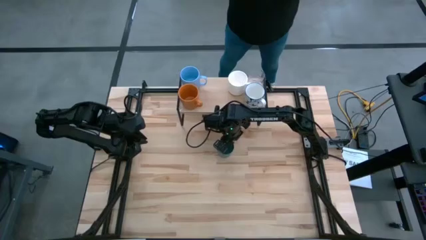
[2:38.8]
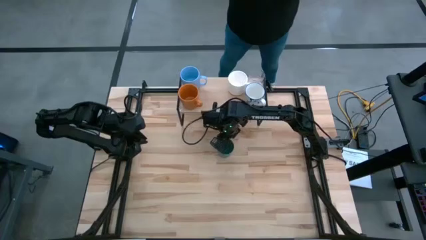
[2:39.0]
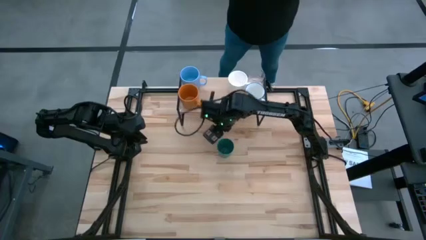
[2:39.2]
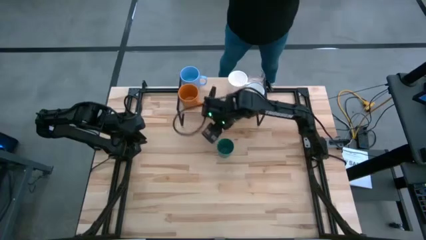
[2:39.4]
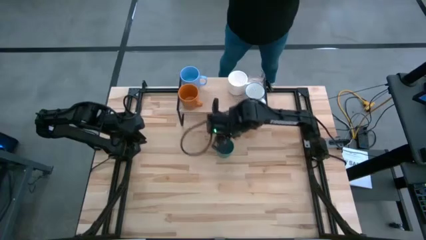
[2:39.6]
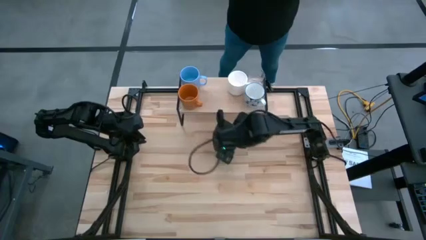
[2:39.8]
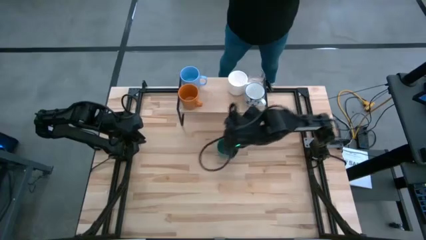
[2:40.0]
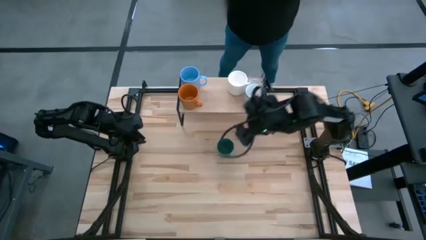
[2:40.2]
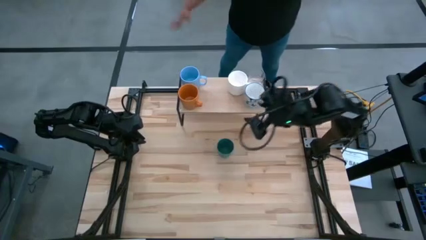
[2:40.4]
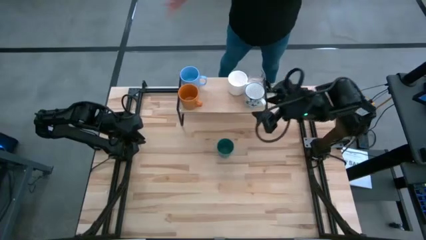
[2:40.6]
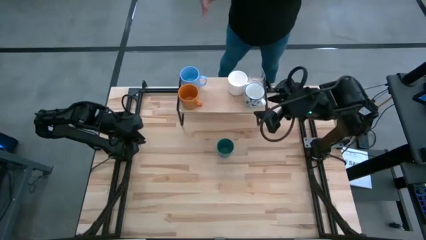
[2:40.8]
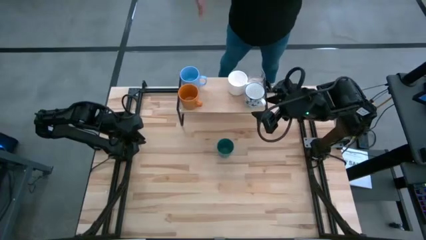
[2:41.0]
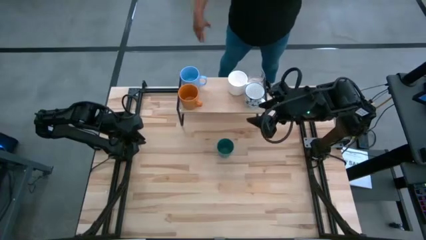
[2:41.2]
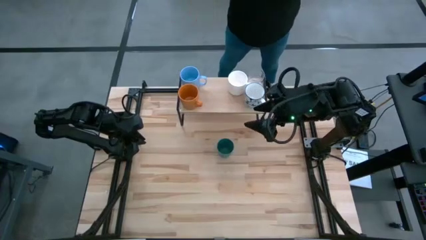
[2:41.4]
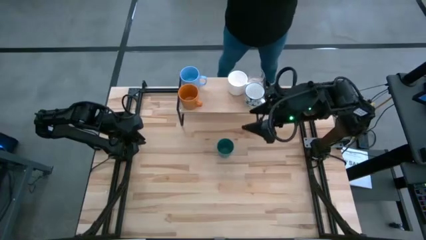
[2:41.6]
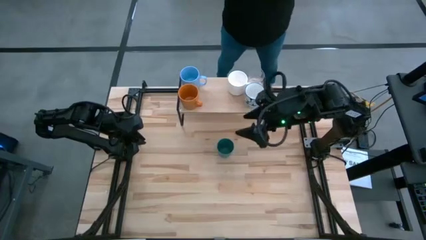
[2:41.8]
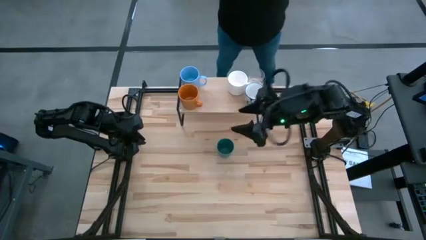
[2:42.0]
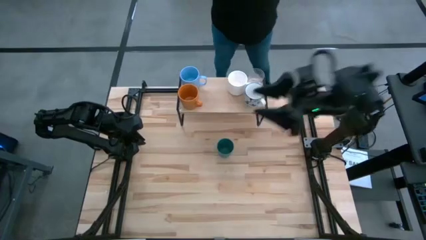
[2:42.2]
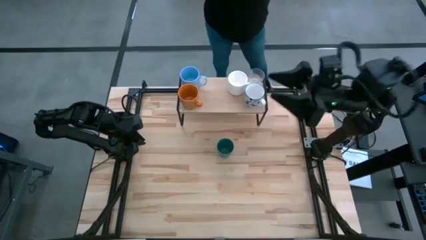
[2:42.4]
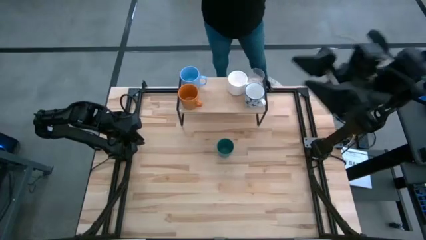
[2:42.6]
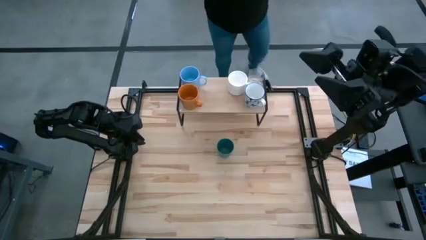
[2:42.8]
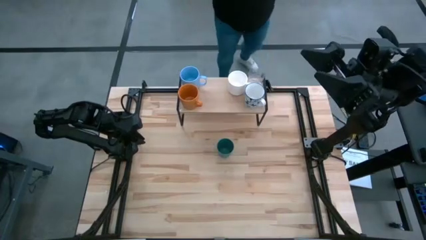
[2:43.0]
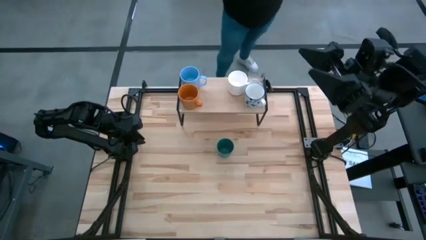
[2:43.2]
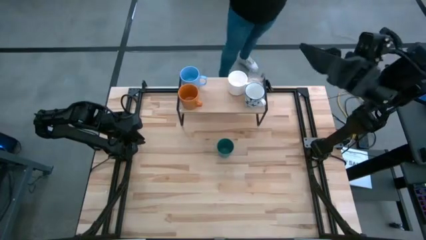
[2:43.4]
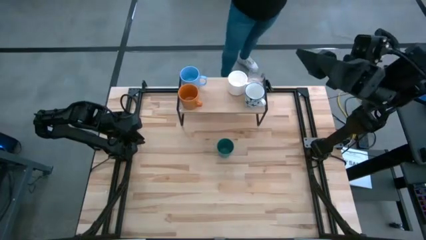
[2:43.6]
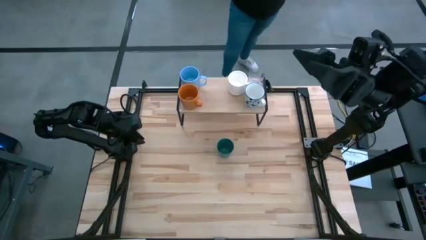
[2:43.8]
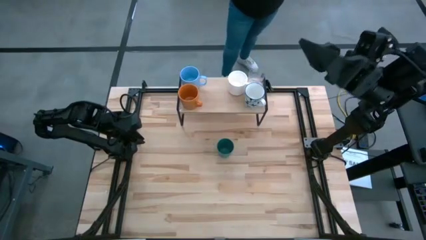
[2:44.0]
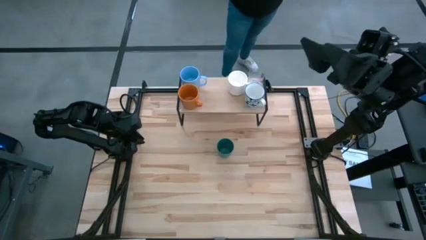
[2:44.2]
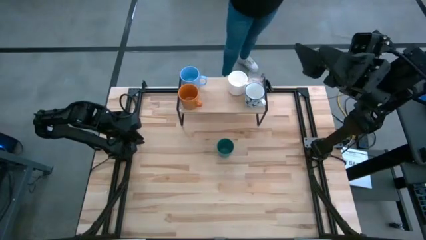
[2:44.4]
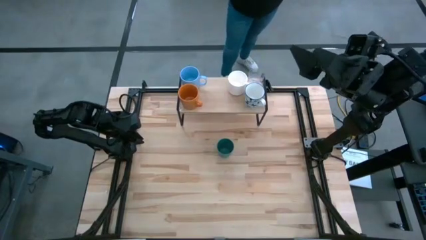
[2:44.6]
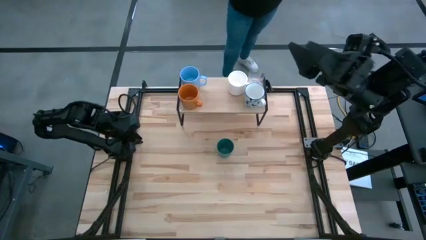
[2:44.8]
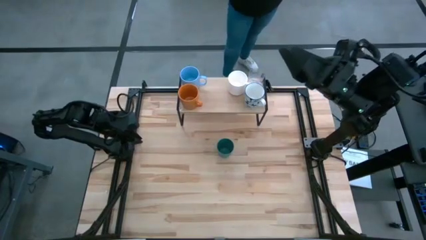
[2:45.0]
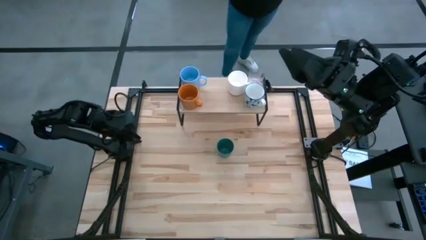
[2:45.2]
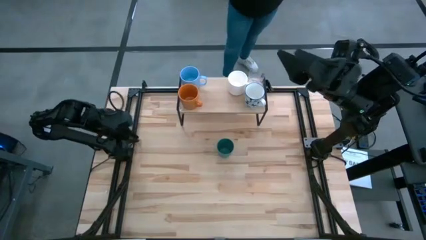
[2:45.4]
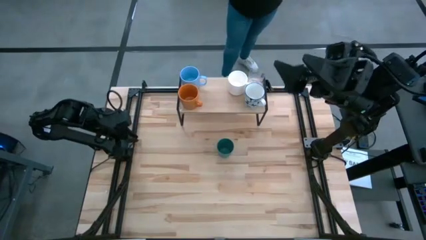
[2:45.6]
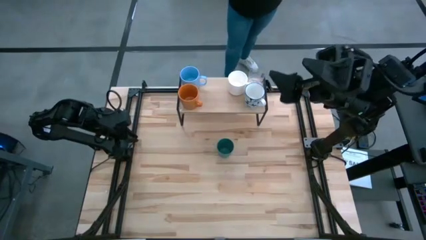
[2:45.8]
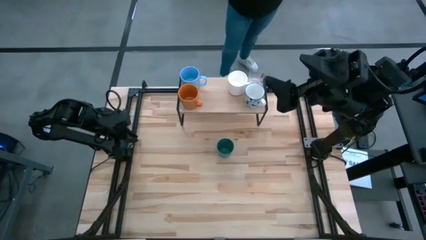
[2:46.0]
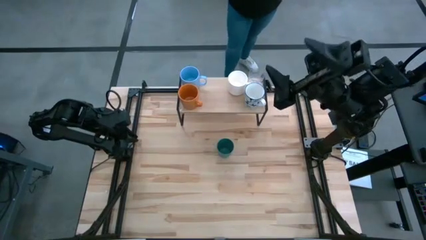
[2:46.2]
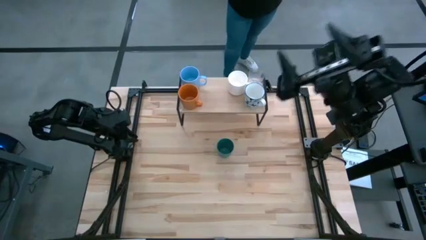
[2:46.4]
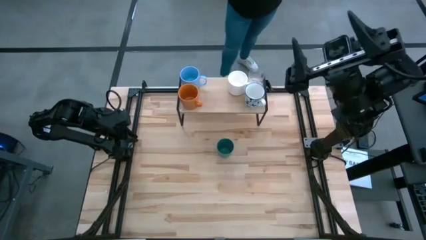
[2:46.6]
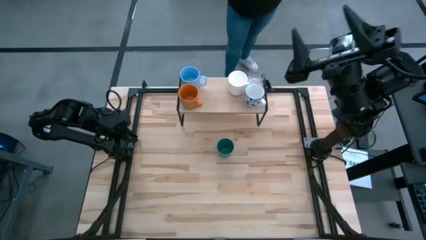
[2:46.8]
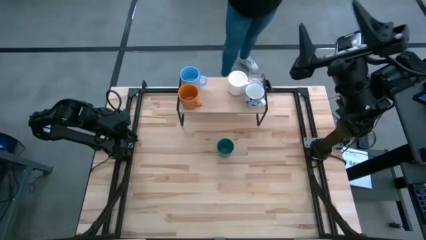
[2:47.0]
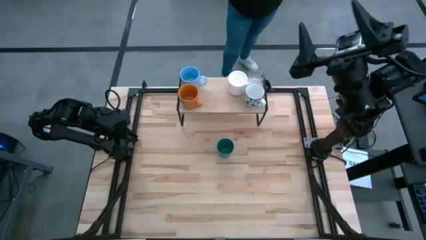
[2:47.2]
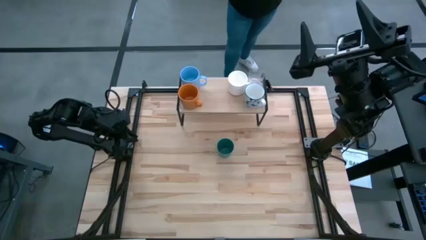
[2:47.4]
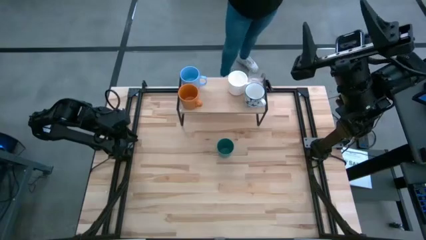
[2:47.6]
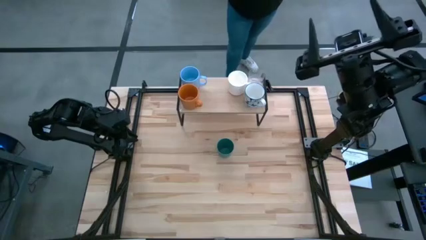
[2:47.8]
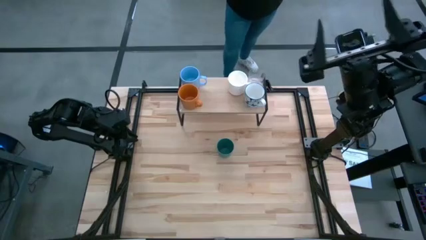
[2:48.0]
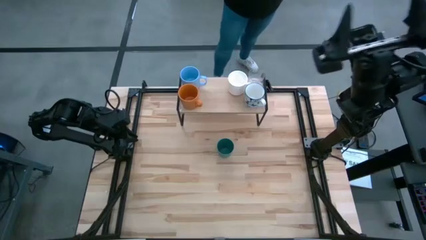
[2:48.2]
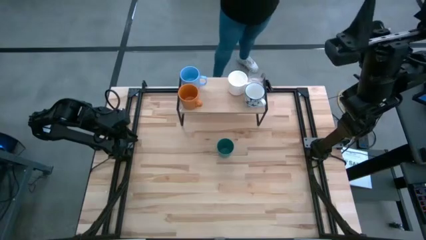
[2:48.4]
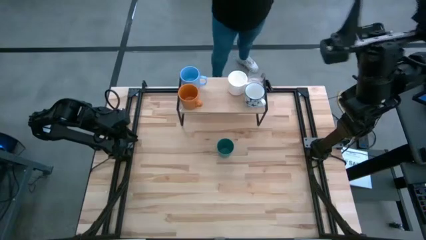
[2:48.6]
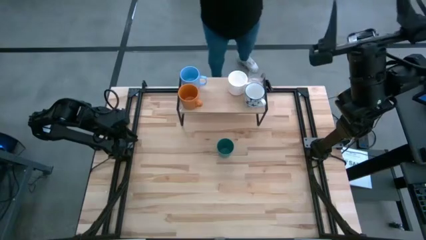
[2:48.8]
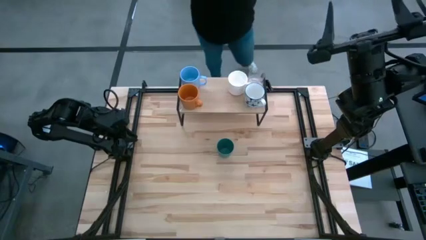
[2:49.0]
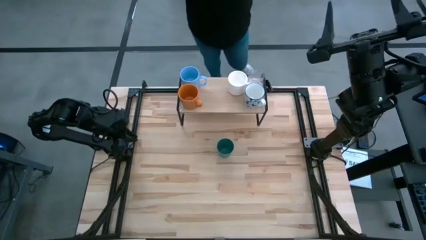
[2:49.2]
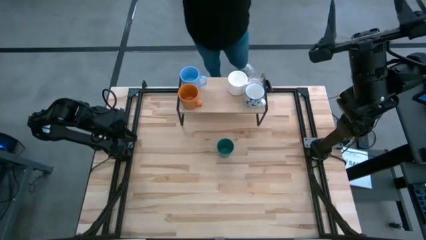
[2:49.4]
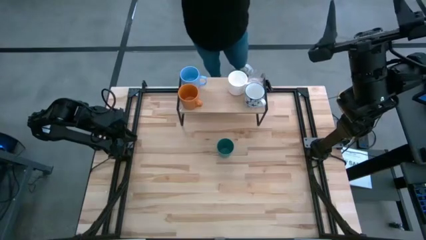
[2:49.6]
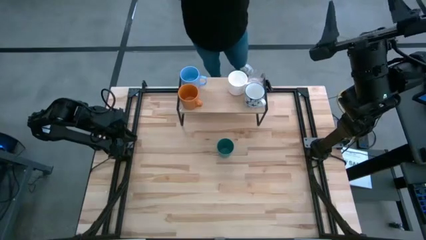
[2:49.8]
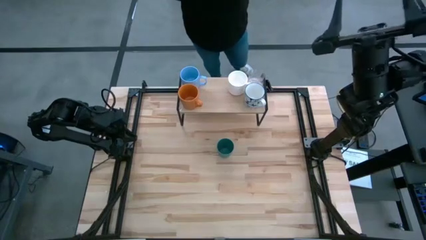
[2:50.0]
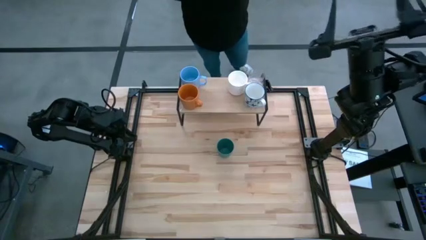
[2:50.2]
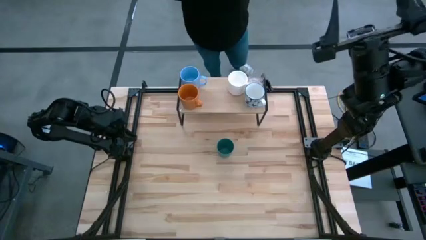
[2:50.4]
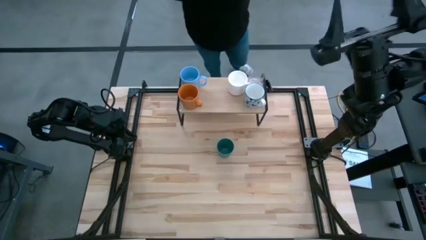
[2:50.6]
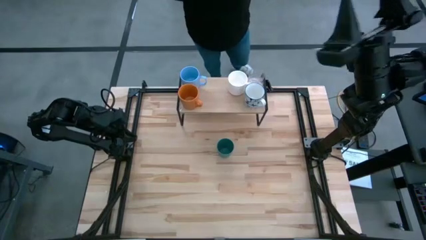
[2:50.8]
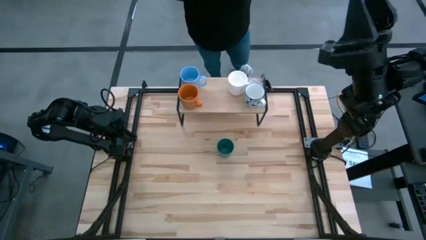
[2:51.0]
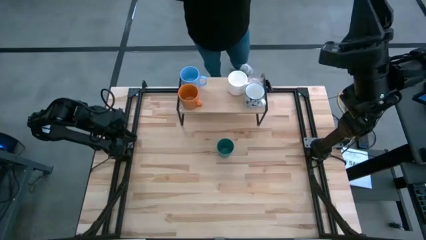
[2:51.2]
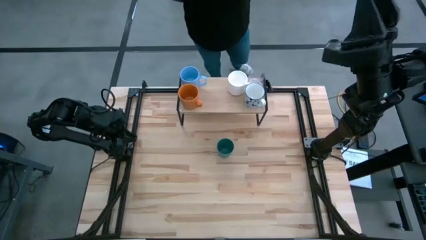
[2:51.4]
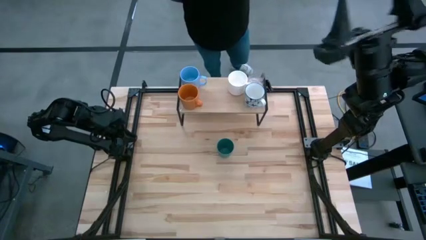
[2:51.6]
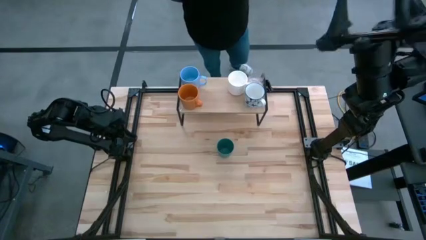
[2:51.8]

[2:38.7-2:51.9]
Task: Stack small to large cups/mugs on shelf
Put the green cup on the shelf

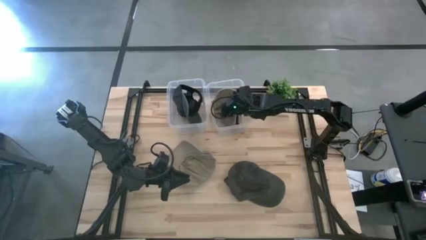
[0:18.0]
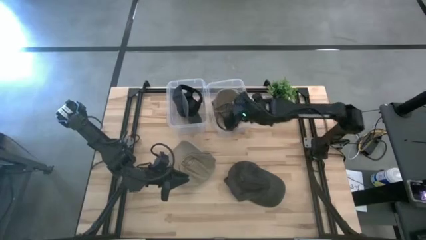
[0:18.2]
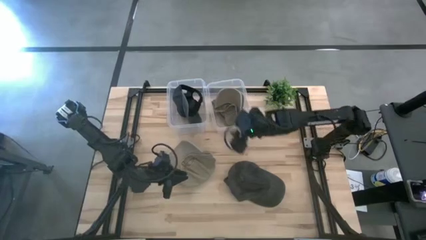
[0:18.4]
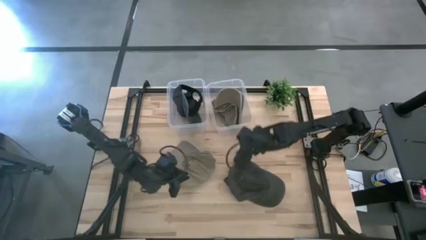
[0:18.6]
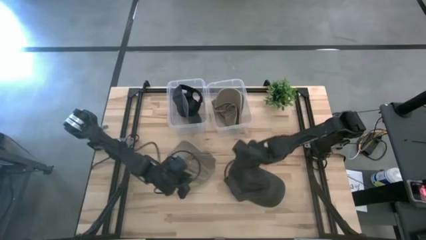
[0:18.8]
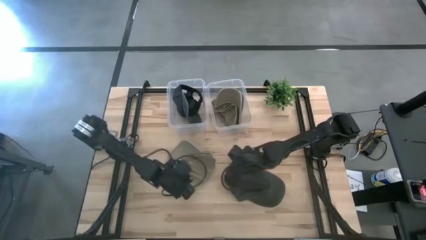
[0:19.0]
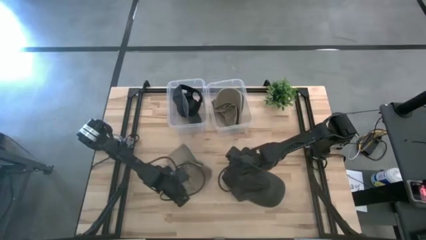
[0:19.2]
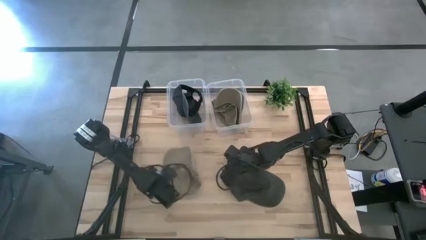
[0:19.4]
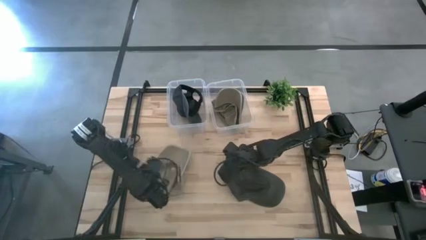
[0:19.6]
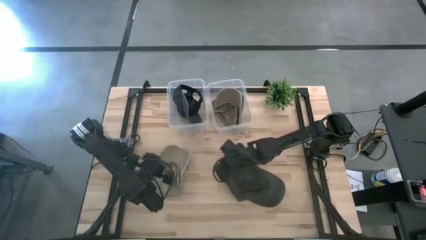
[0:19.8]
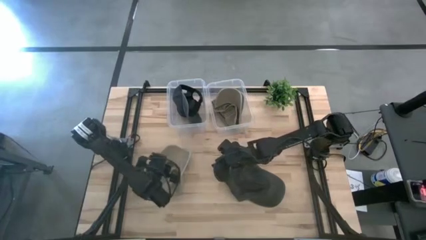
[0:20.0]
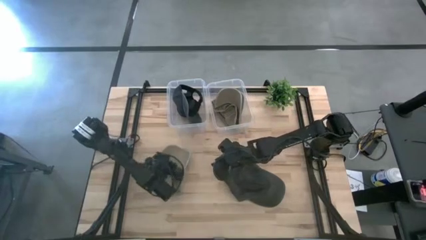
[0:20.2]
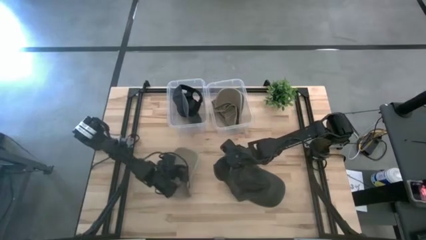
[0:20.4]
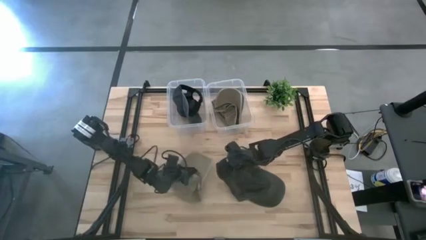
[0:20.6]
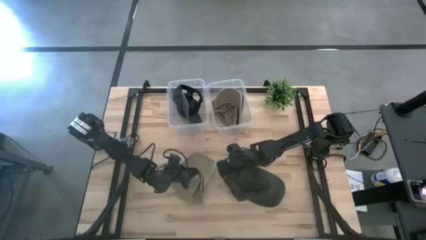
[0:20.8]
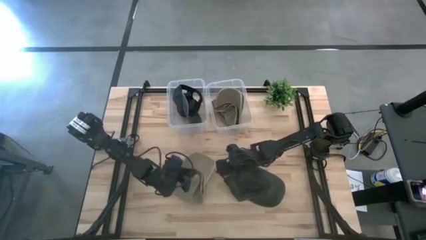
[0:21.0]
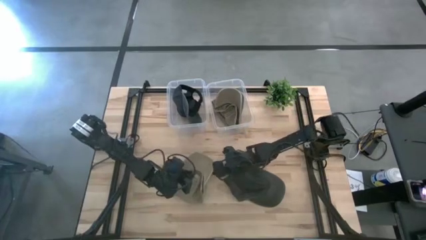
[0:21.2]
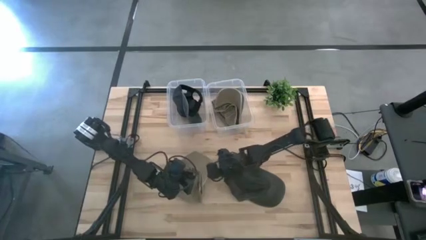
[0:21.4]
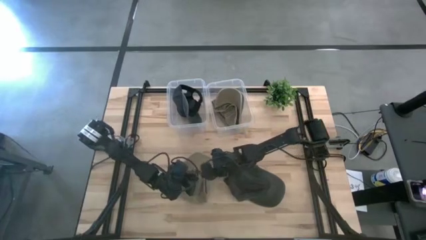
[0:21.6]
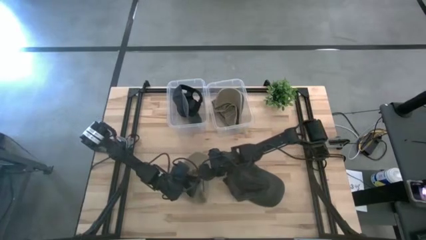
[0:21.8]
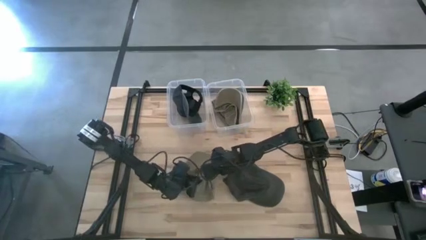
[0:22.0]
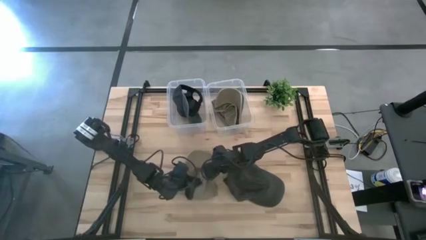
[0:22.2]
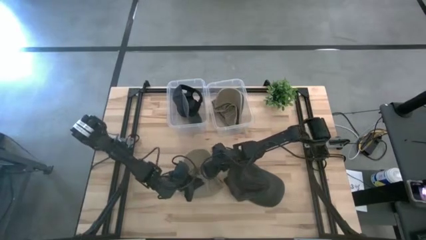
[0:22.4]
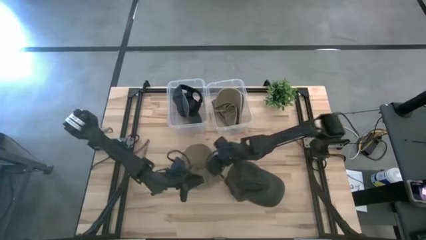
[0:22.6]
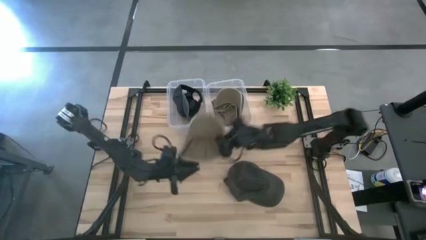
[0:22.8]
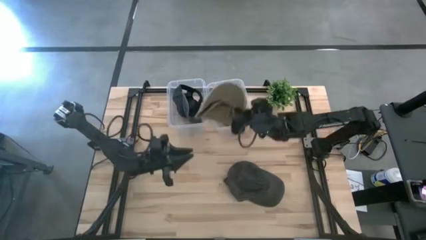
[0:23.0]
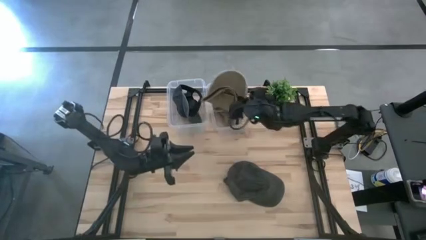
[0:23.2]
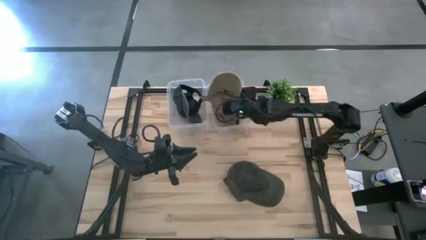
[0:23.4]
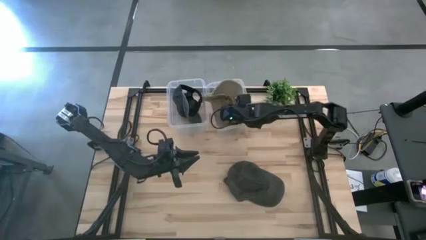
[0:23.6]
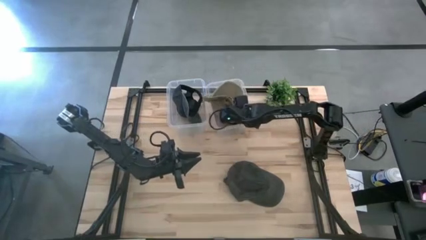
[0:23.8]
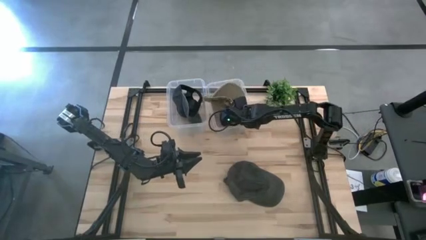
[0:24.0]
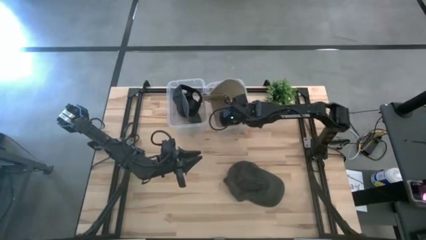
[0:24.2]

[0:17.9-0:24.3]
Task: Pick & Place hat
Put the brown cap into the right transparent container
